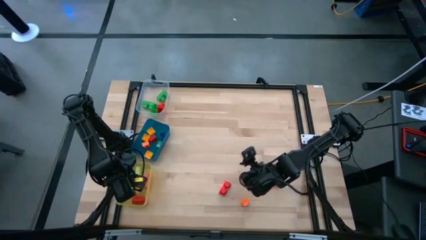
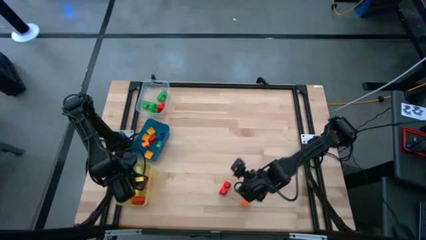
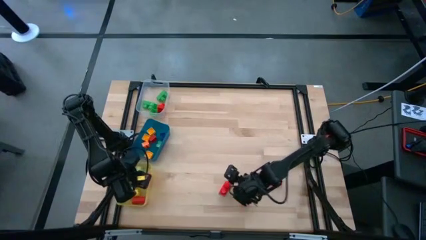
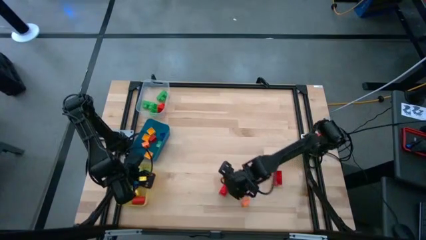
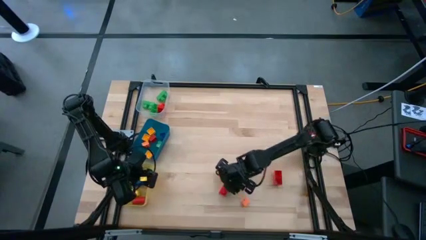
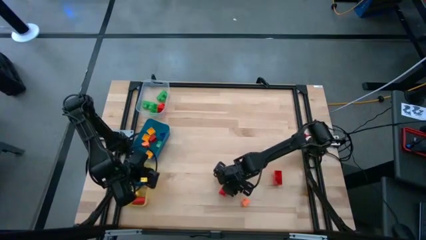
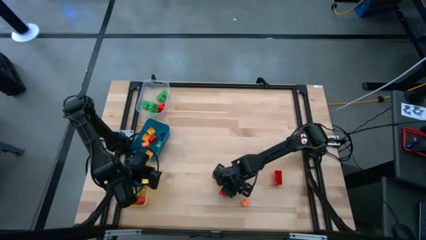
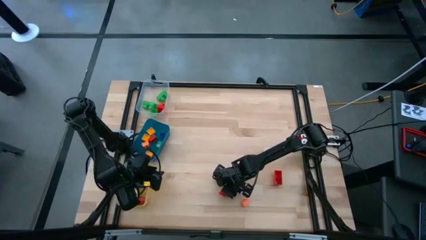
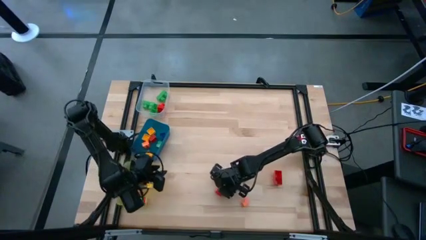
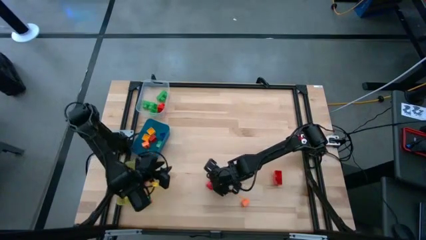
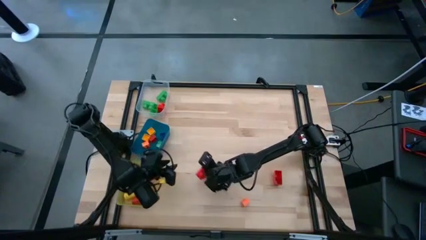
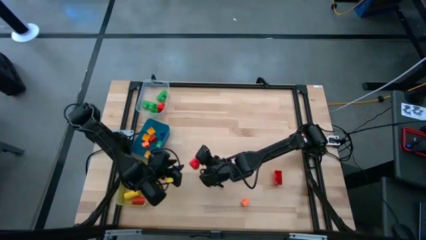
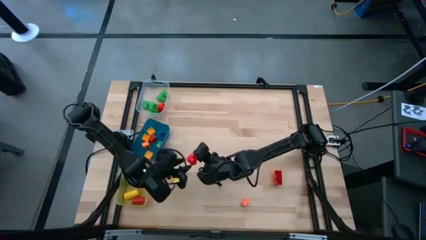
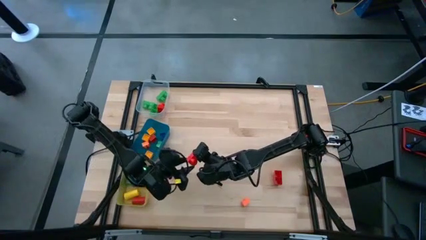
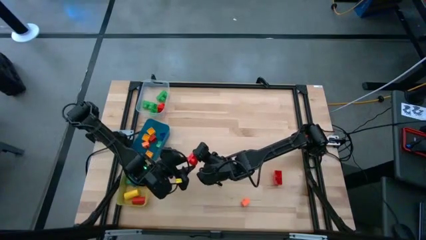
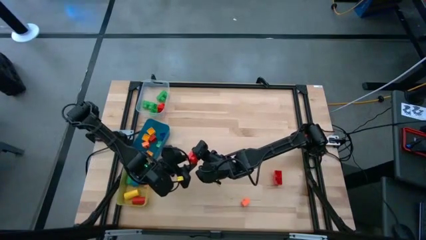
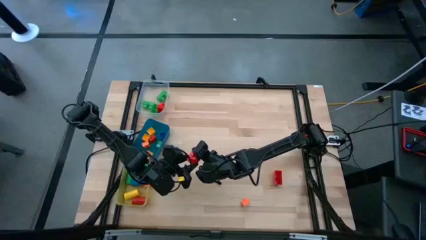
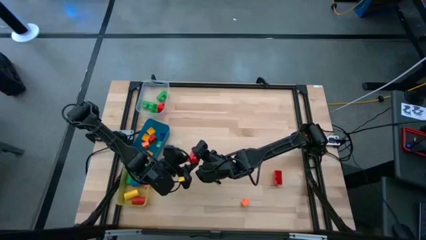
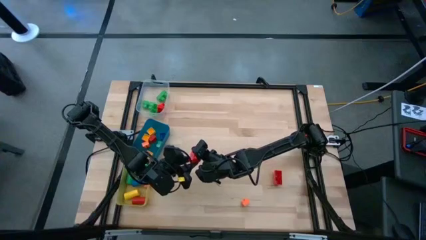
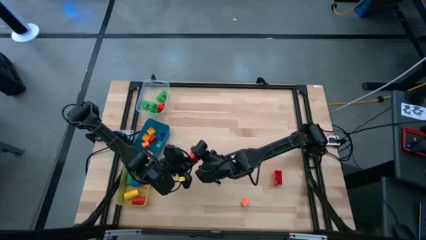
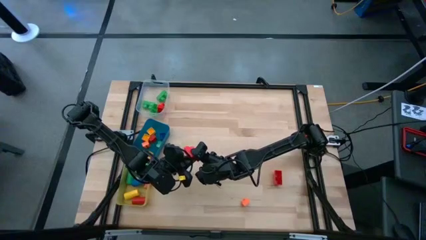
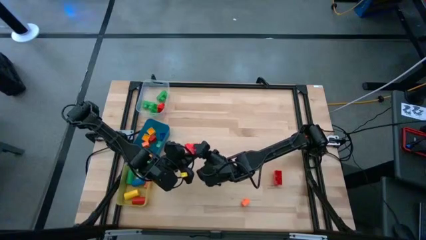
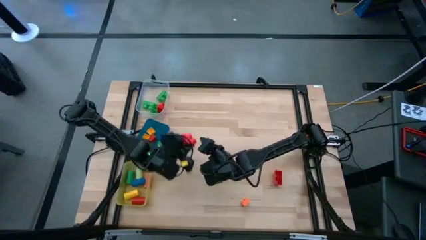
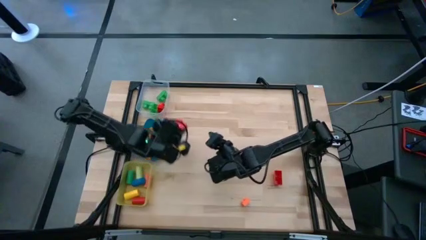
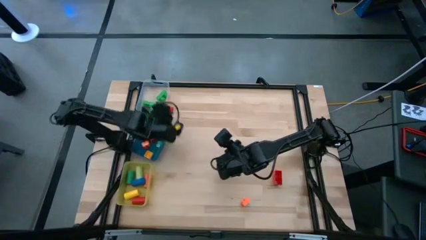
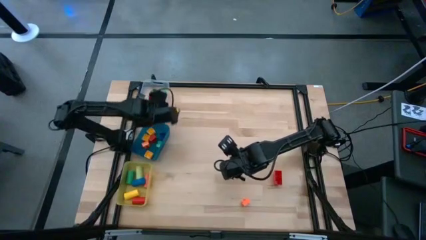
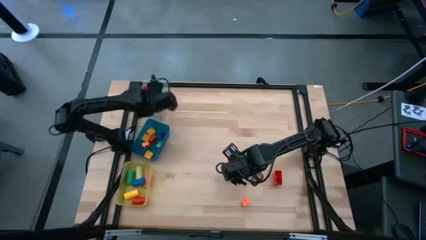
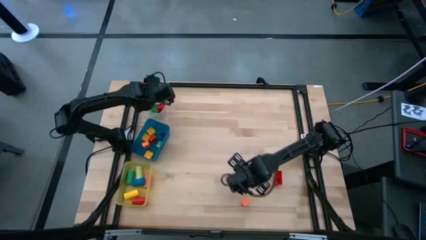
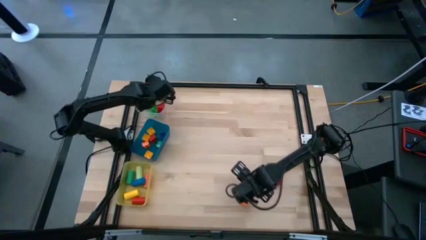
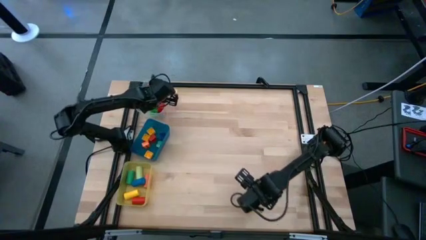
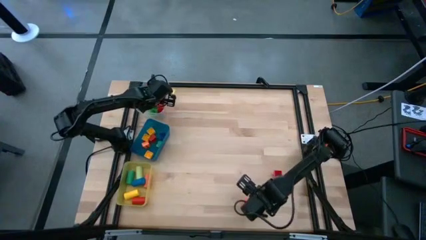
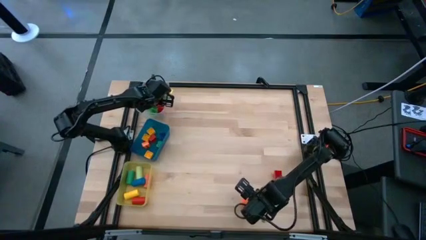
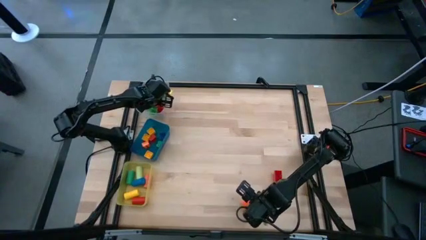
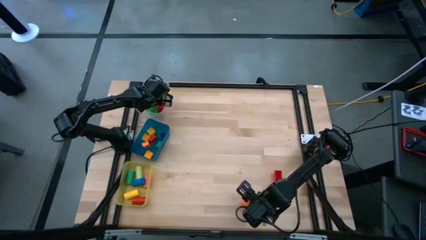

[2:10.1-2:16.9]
Task: Sort blocks by size
Put the left red 2 stud game piece into the transparent bin

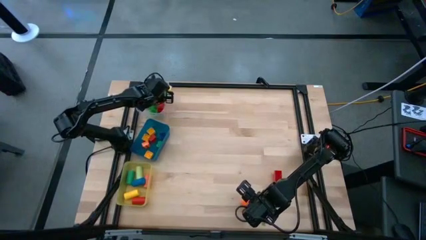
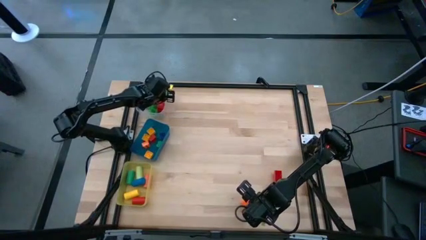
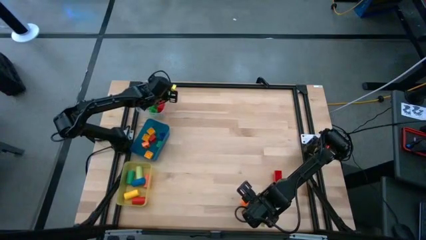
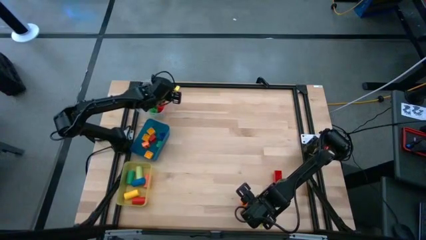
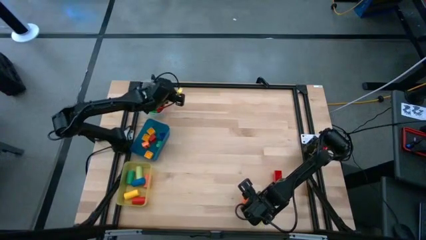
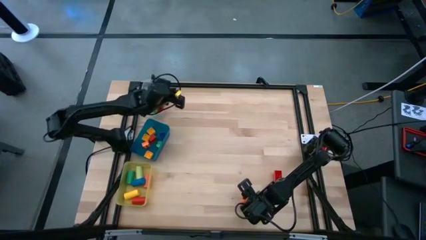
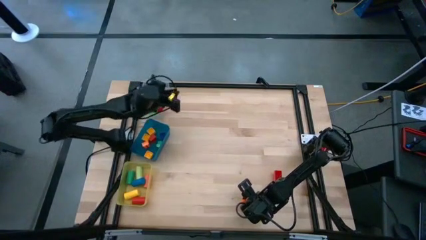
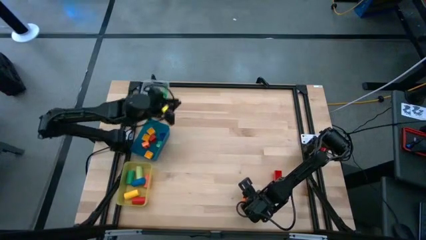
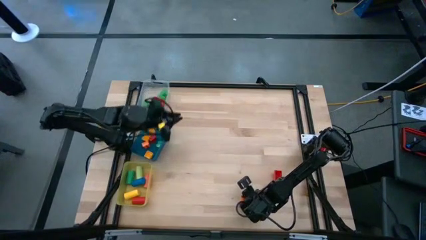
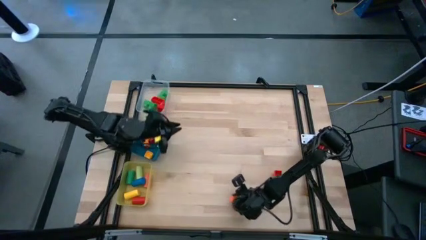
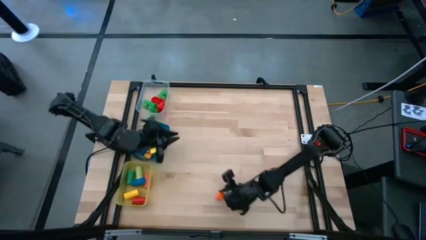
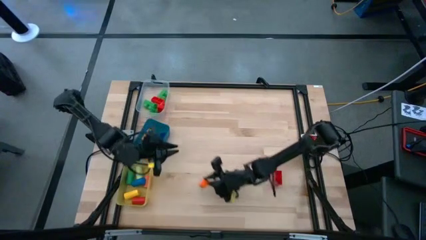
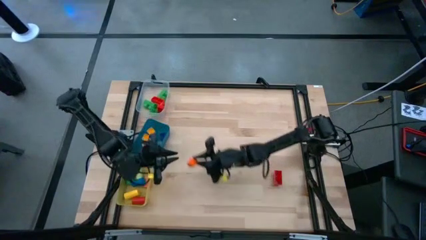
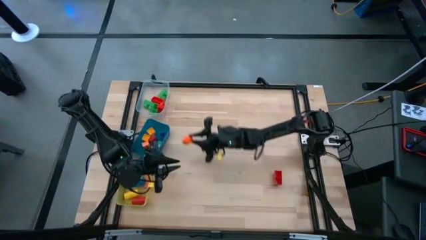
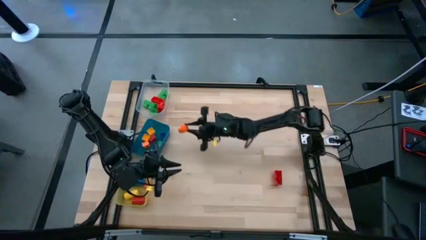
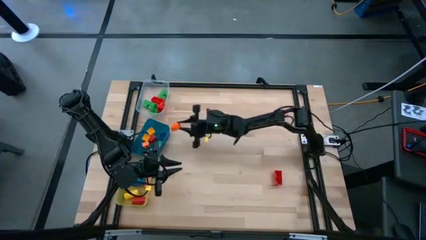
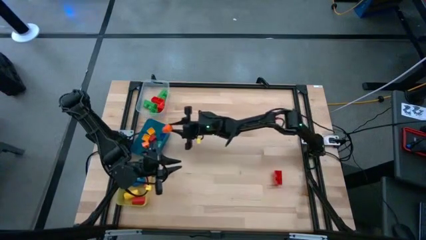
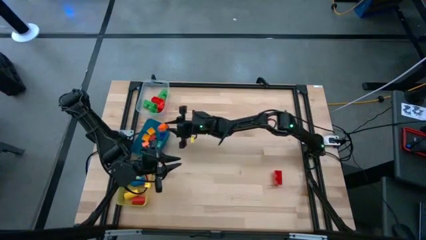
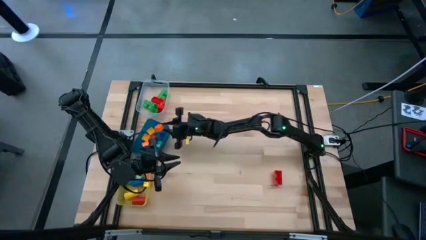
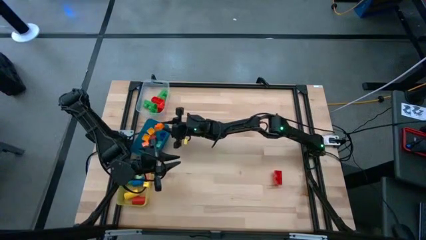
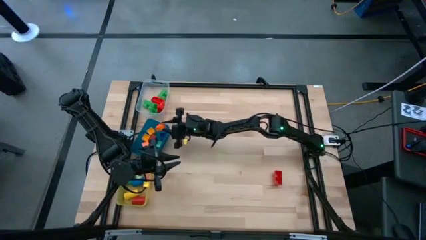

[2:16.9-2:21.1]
Put the orange 4 stud game piece into the blue bin

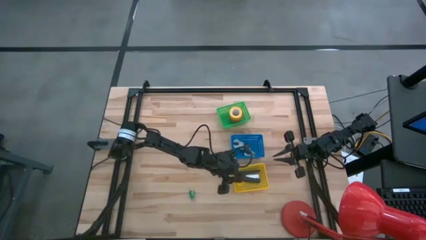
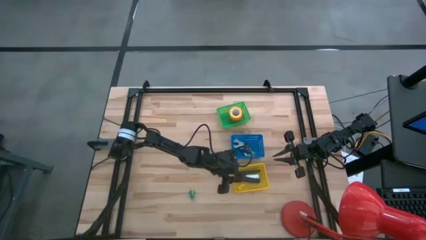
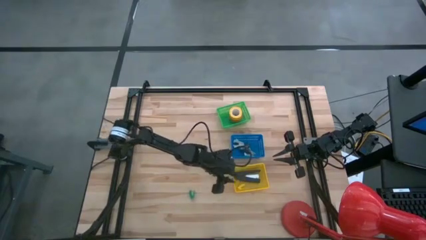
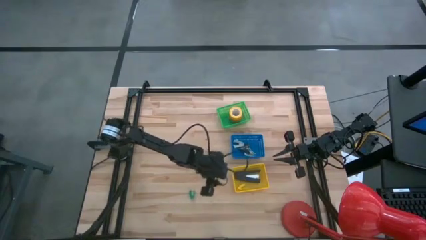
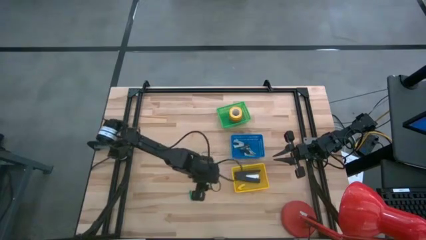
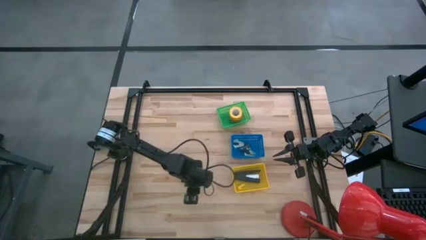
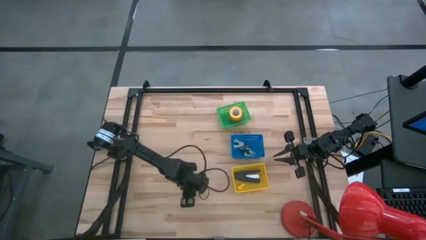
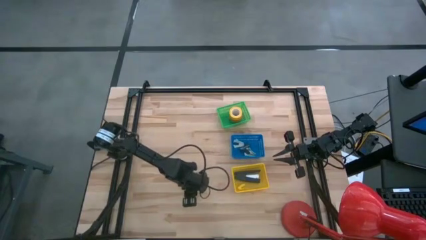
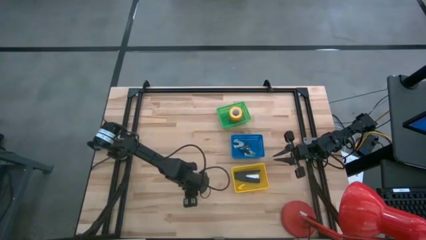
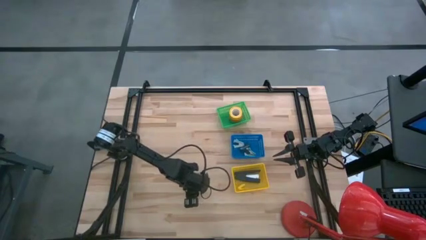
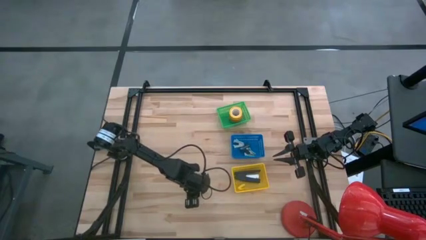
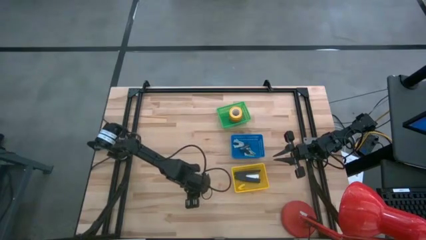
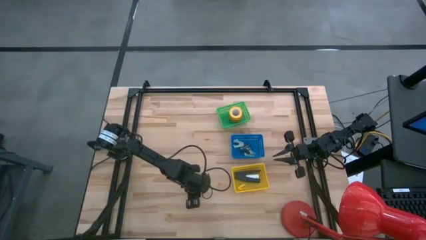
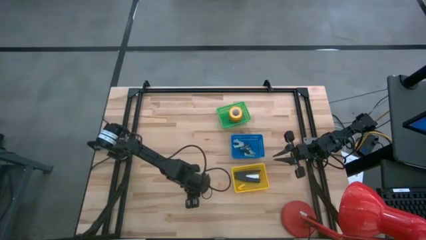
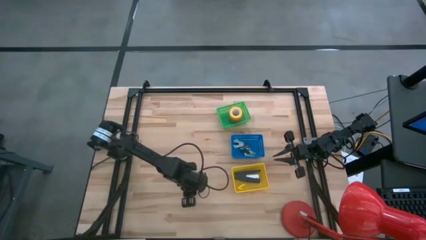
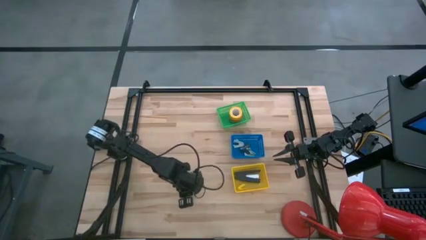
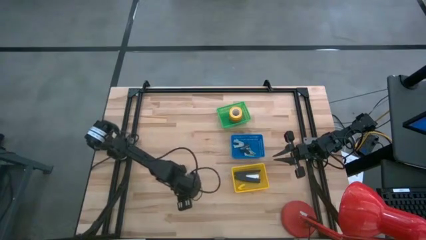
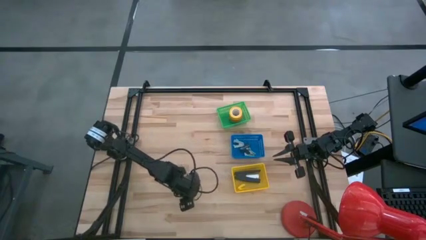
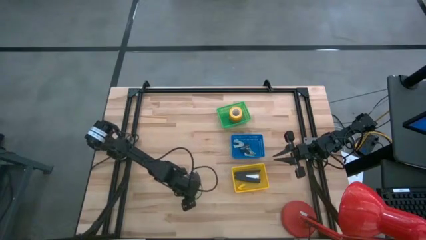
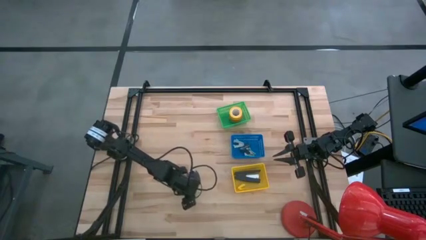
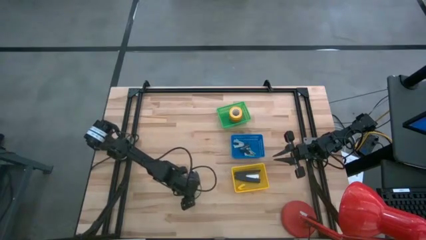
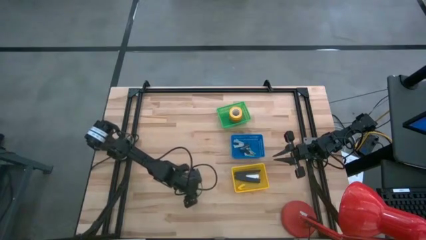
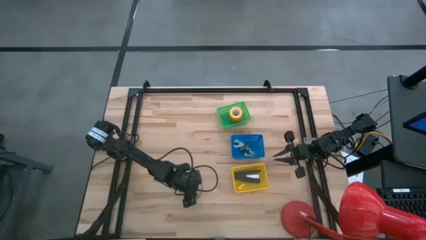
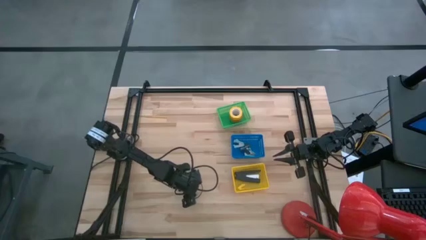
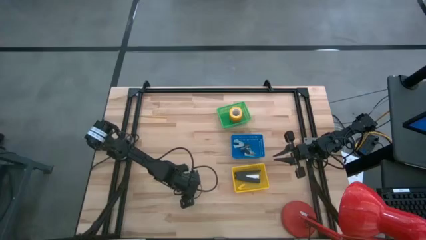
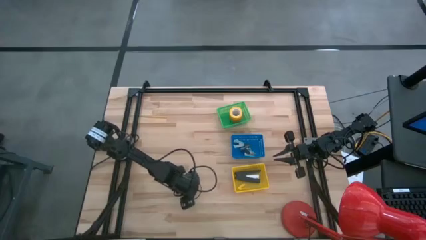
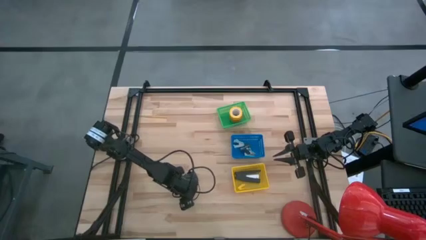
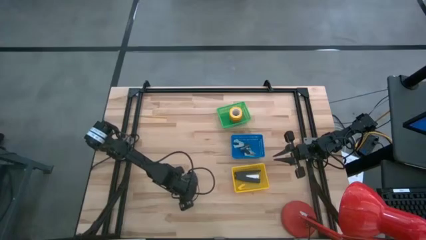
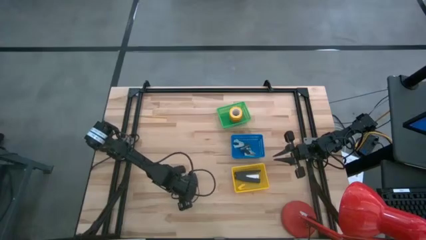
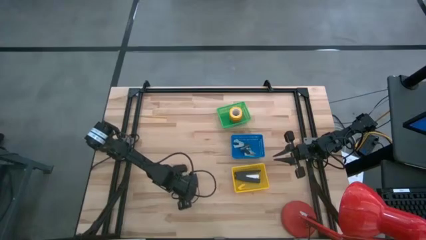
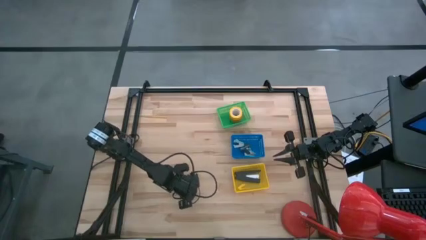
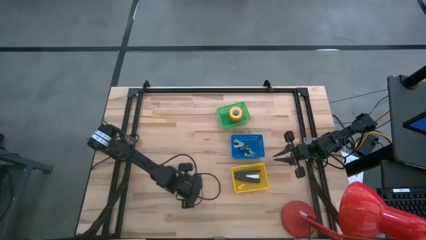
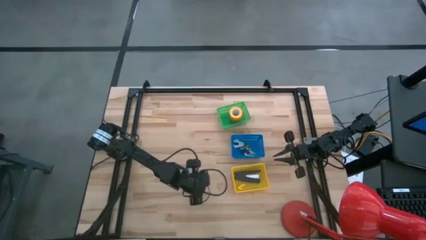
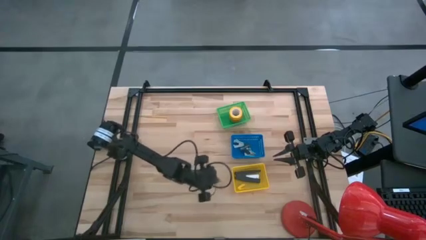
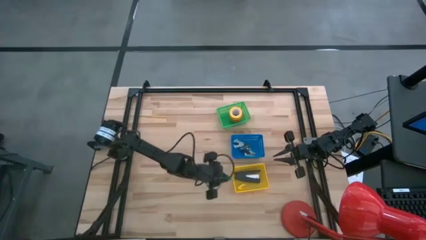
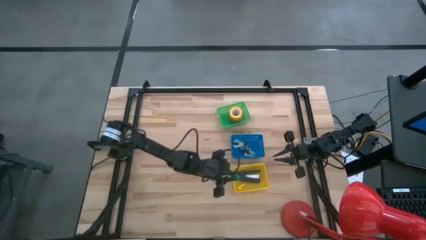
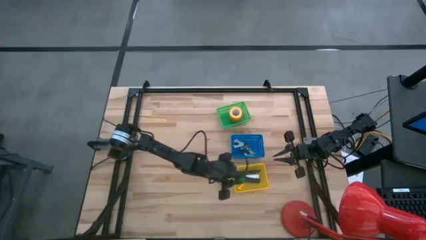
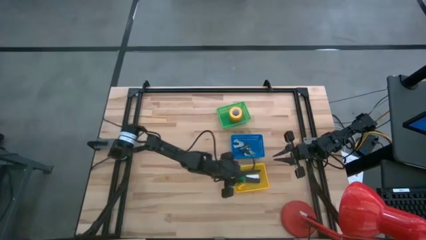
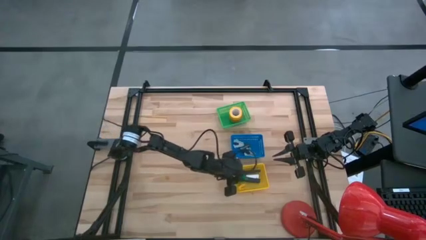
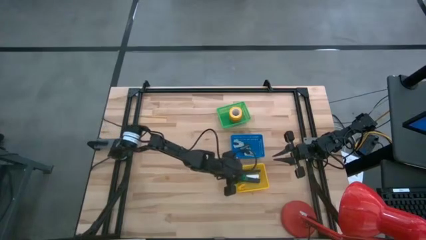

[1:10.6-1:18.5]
Task: Pick and place Stapler, Stapler remover, tape
Put the green stapler into the yellow bin
